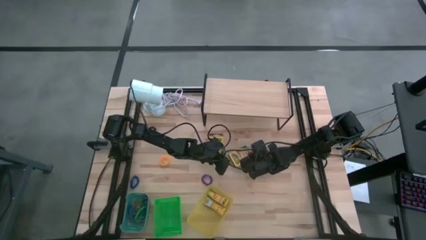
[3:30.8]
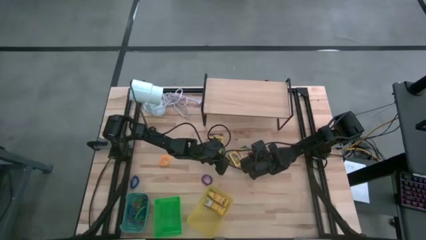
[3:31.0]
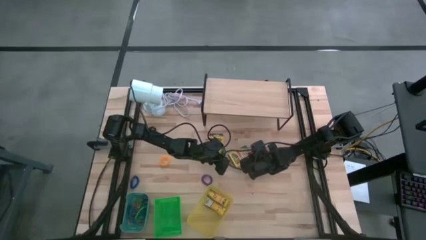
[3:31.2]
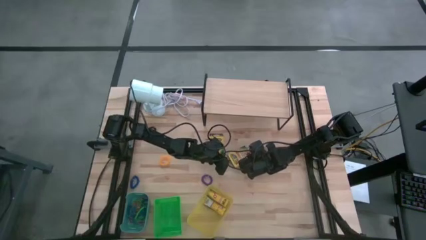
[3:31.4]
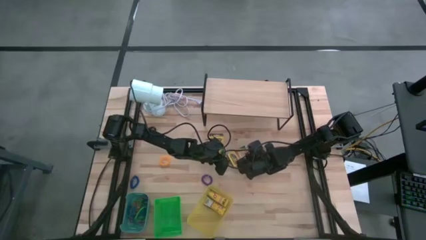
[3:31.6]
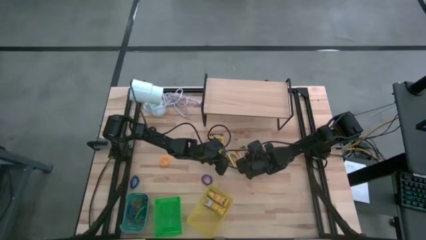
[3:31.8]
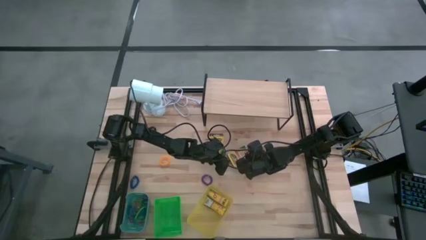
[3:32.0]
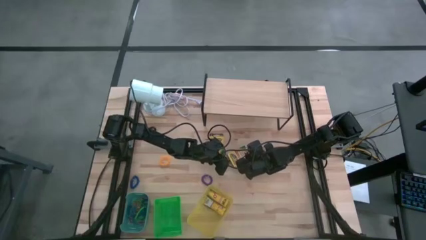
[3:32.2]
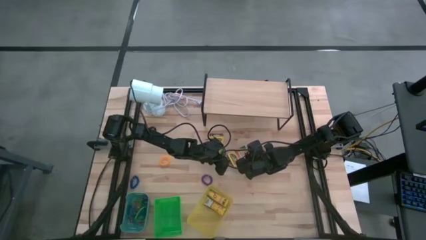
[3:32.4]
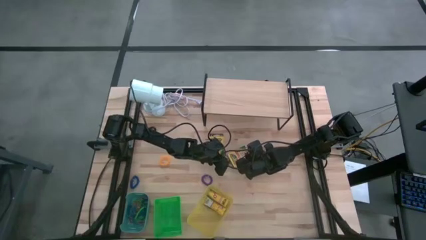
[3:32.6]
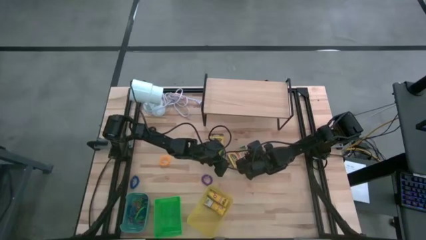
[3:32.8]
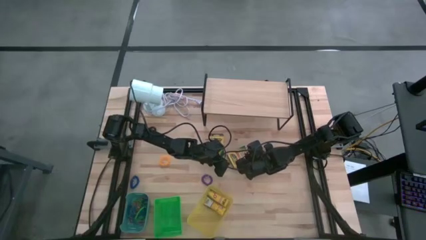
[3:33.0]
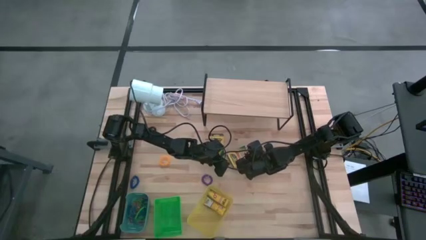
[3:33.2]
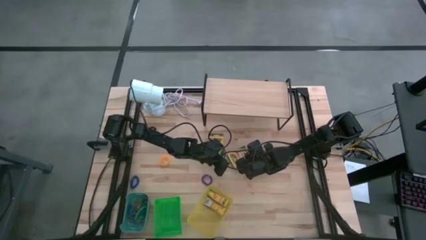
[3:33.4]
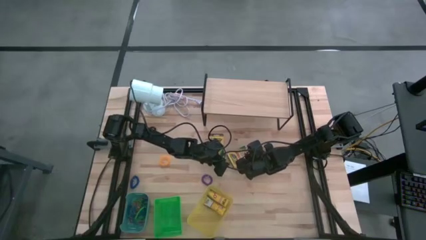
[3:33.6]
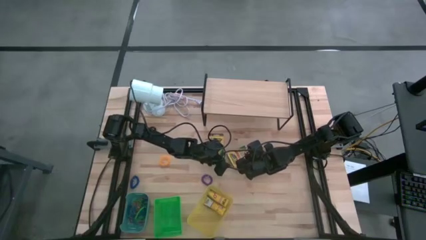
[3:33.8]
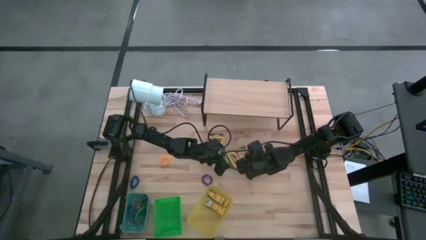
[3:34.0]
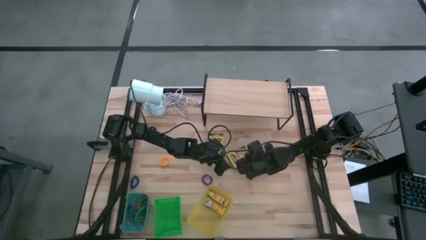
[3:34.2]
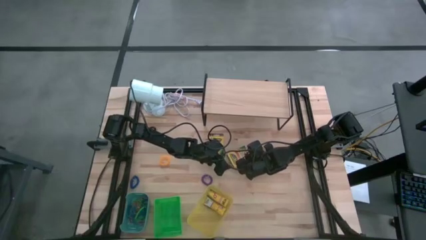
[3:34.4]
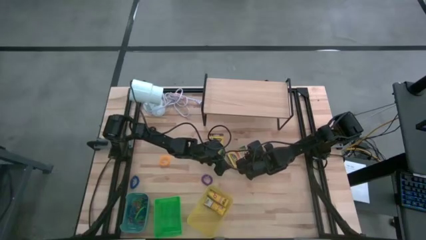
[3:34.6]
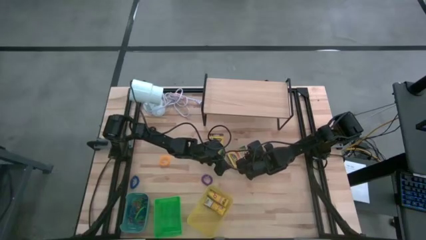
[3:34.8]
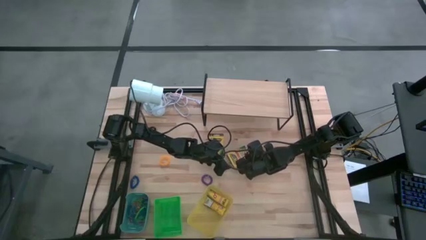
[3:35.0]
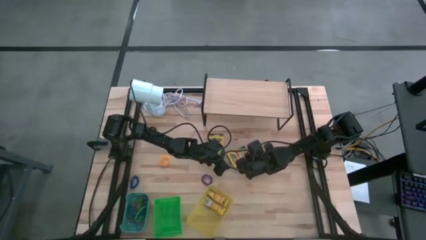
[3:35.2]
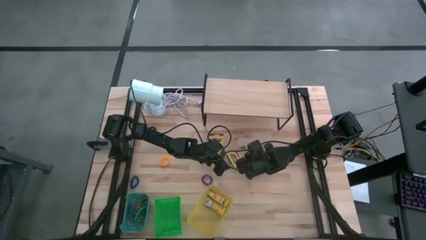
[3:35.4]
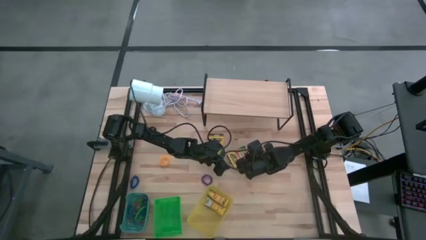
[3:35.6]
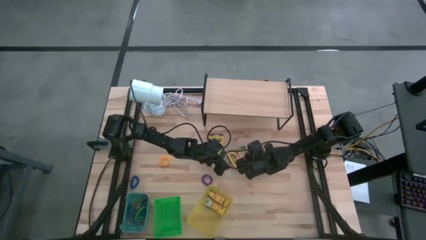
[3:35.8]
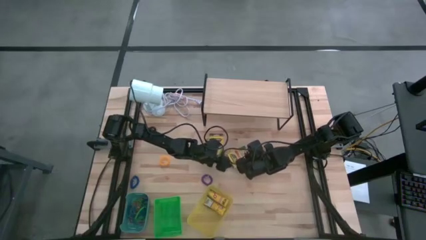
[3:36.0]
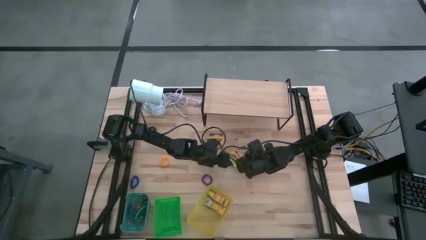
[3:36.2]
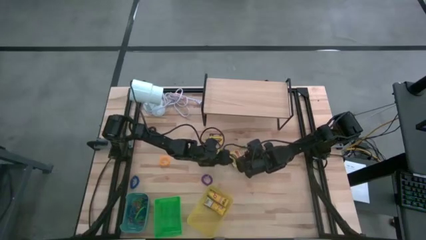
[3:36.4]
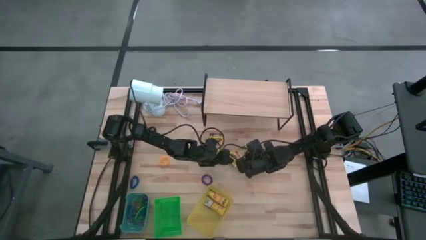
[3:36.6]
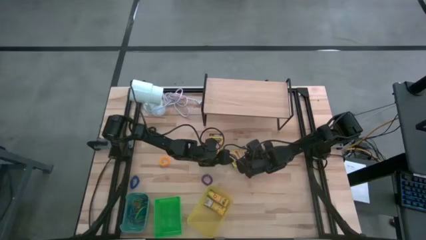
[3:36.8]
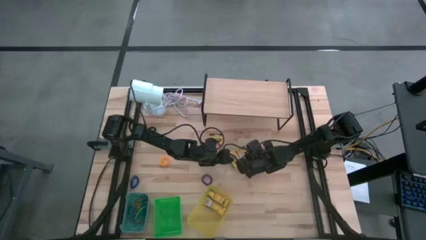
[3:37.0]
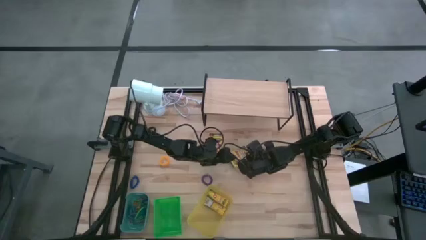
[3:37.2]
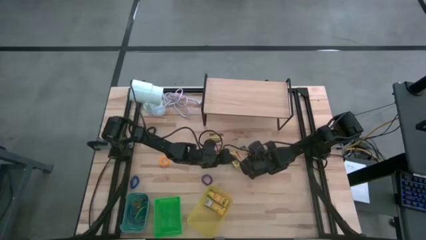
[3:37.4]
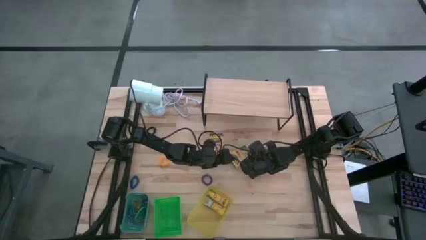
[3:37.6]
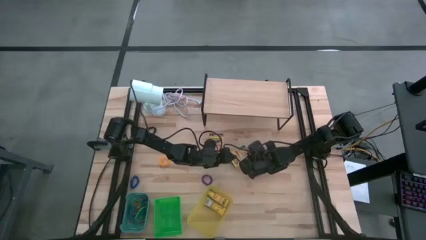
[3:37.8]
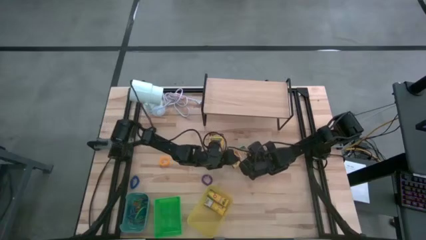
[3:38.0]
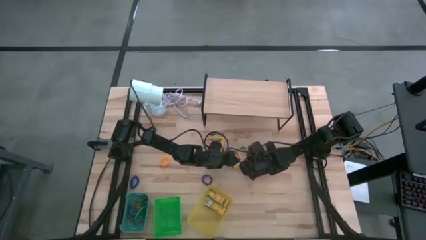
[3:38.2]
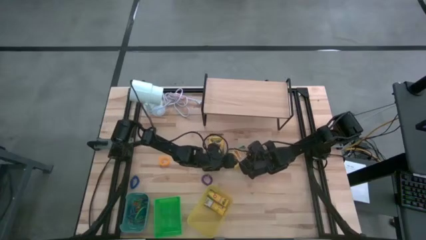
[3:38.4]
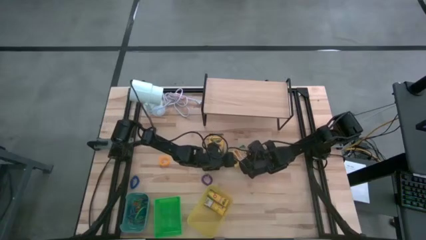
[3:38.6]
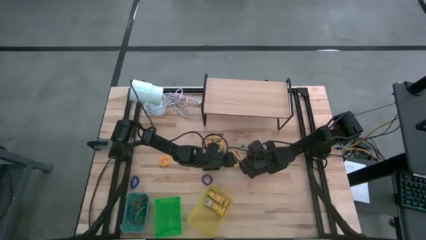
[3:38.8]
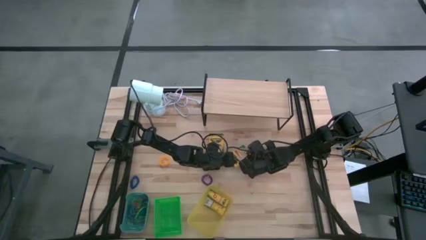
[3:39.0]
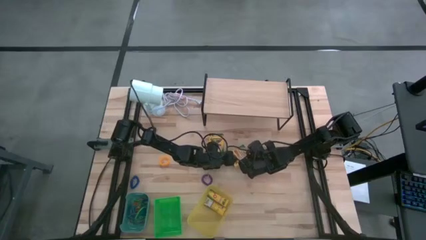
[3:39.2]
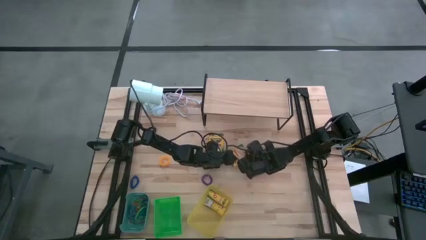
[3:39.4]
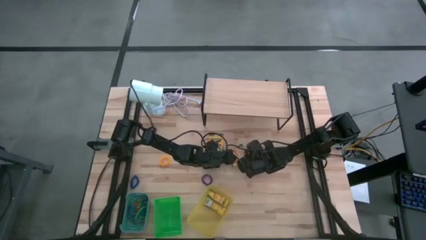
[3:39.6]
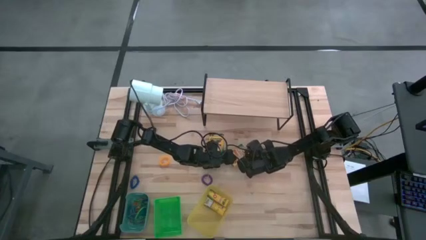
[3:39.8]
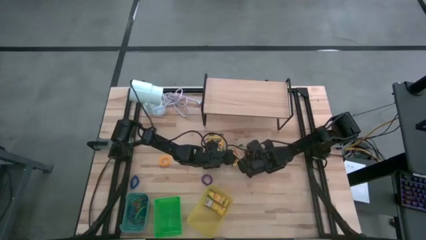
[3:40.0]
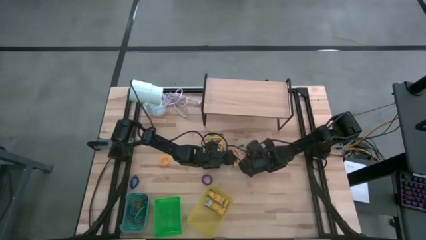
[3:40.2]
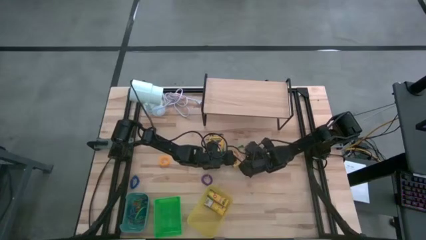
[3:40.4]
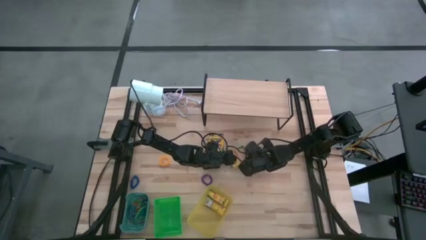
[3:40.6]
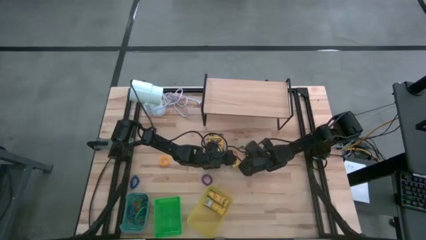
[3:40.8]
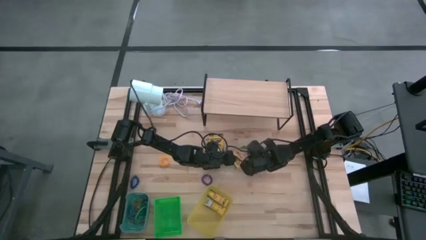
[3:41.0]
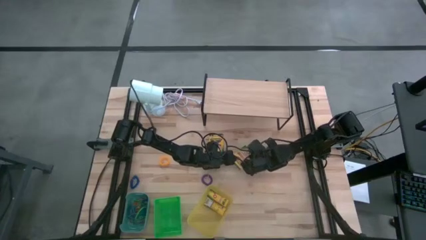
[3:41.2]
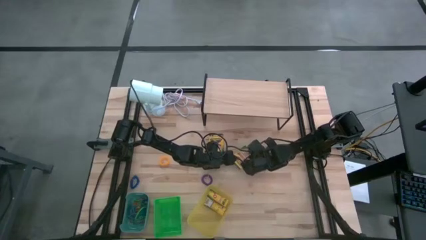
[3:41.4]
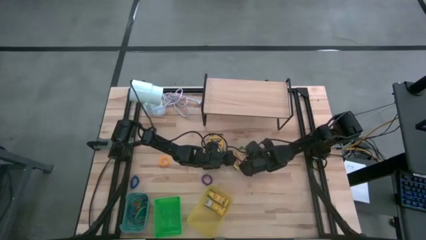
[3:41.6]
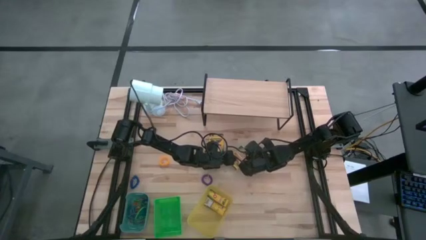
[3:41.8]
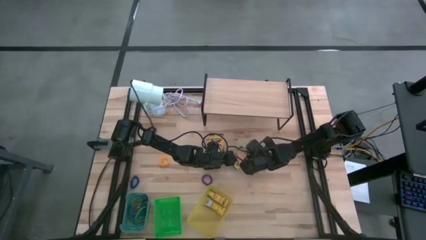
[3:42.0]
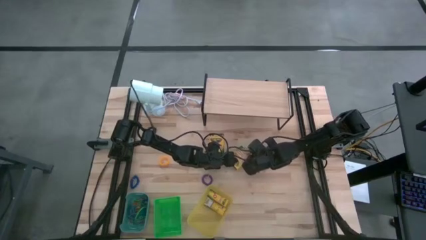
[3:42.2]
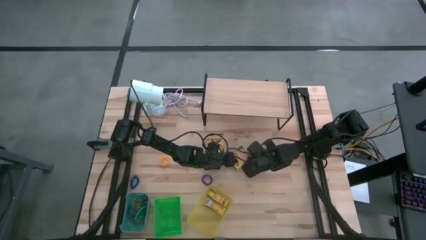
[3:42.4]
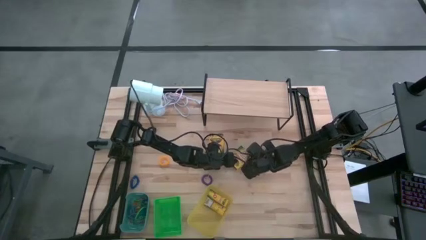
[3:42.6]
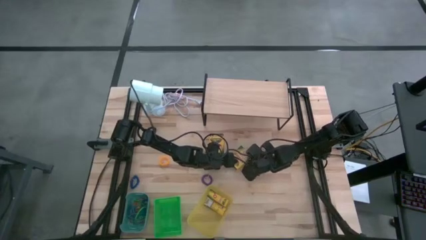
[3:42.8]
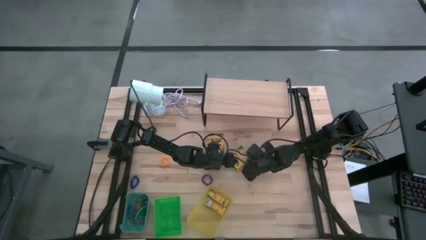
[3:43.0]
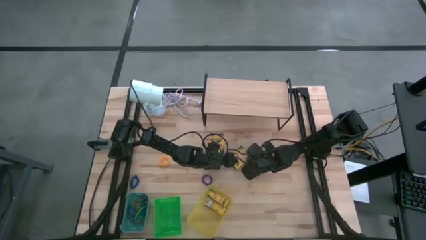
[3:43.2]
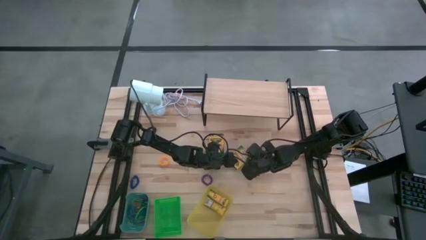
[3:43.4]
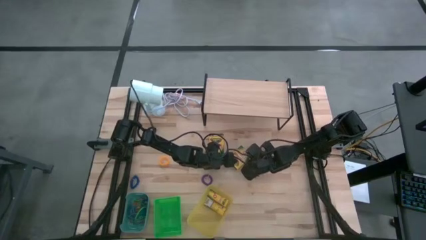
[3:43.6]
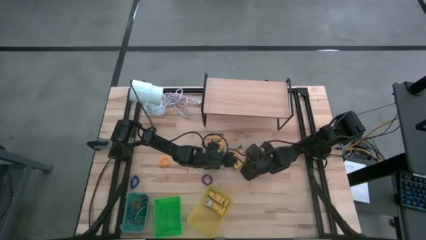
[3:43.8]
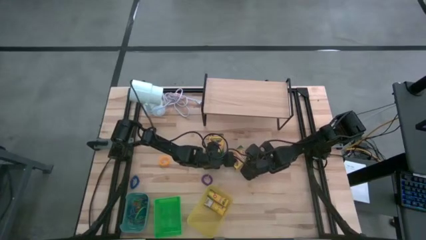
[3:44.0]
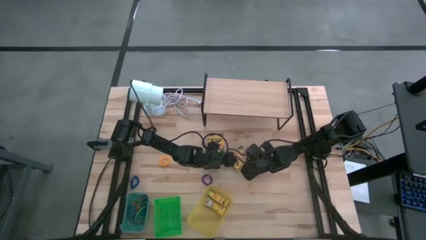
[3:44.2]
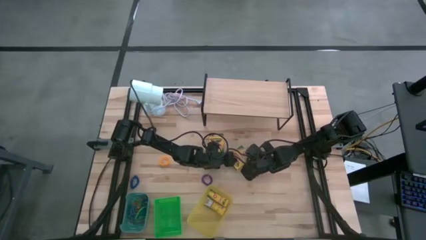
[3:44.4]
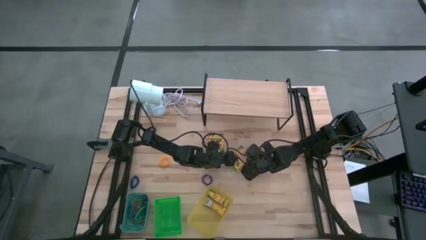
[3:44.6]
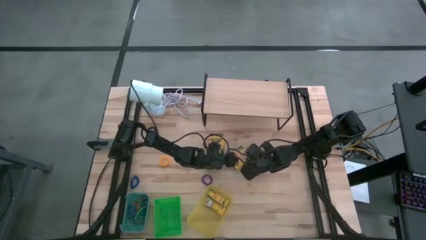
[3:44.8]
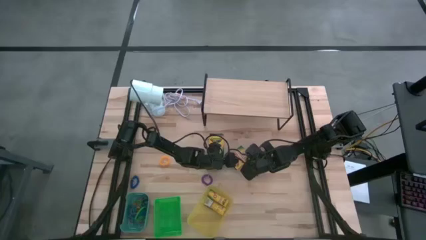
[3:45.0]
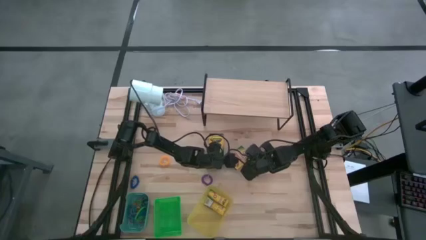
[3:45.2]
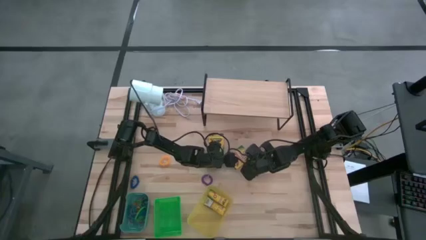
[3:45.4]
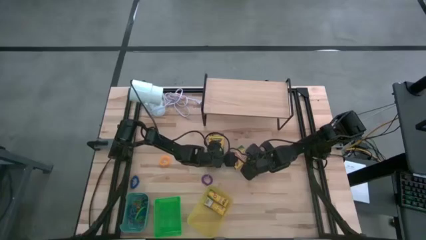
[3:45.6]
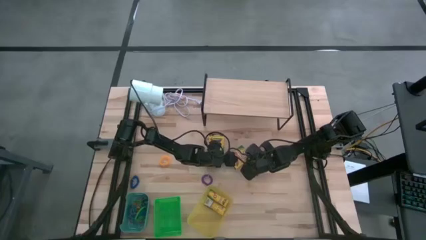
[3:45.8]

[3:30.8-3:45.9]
Task: Pick & Place Office Desk Supplies
Put the crayon box into the yellow bin
